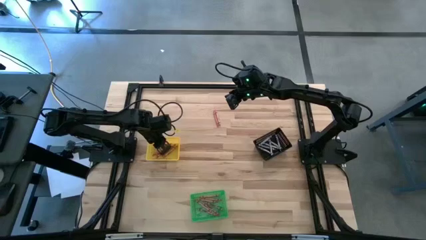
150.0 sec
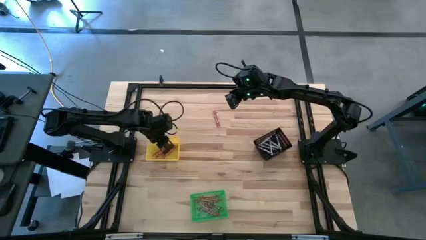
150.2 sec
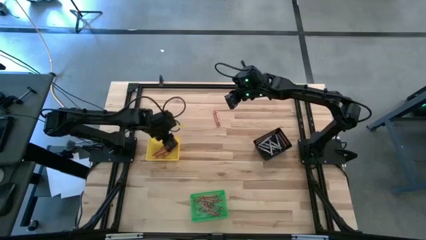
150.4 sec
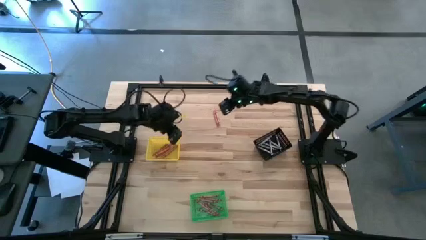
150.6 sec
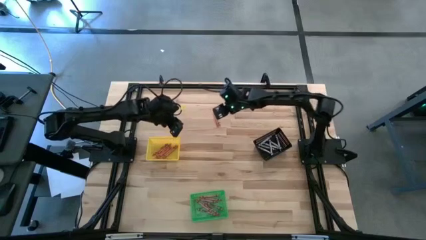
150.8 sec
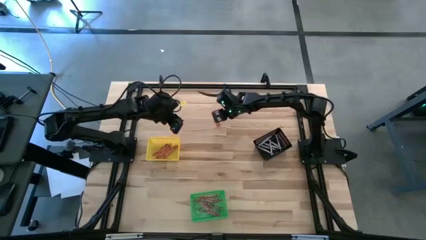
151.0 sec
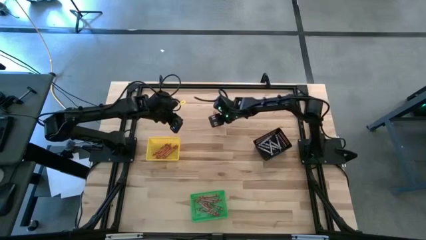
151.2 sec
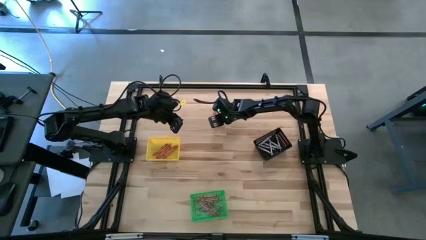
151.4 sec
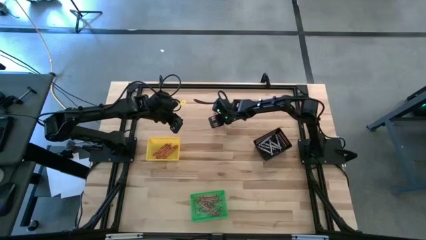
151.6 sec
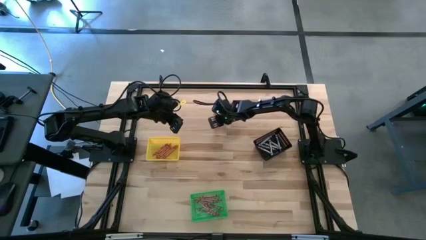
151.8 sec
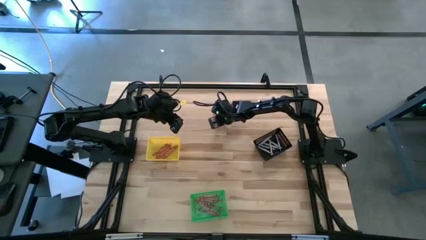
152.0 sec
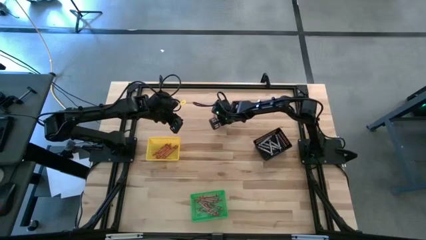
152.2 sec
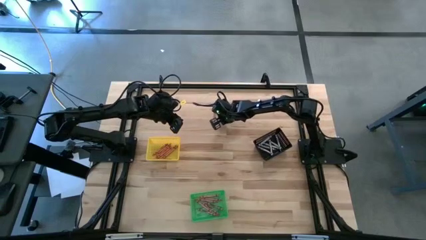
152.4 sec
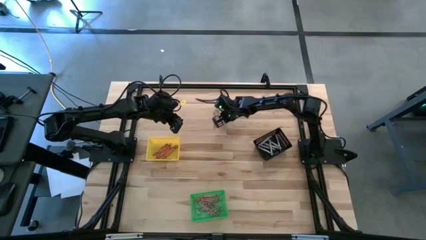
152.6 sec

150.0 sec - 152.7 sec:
Task: Sort crayons
Put the pink crayon into the green bin

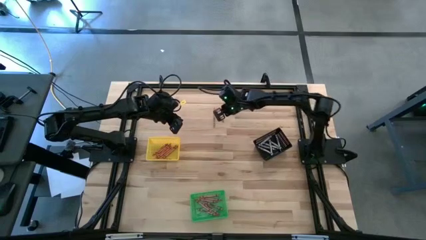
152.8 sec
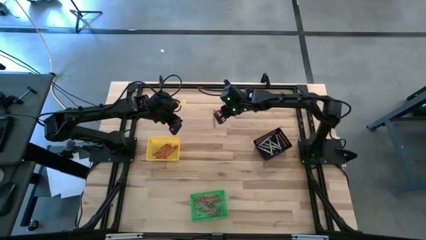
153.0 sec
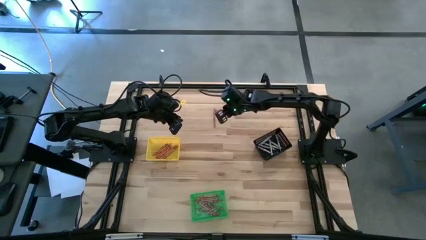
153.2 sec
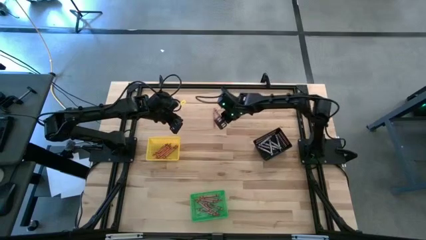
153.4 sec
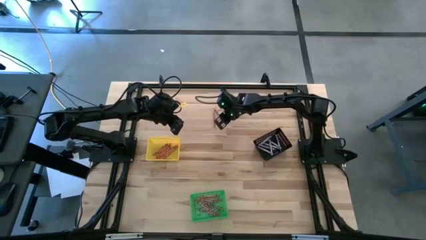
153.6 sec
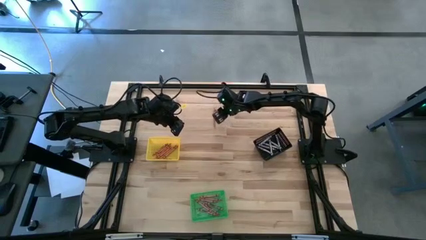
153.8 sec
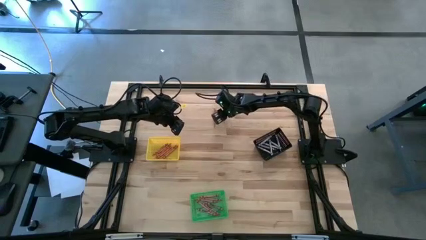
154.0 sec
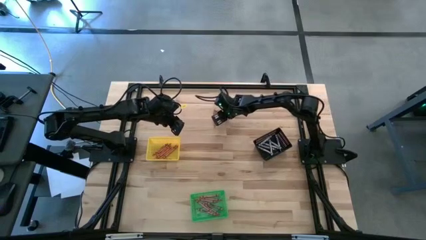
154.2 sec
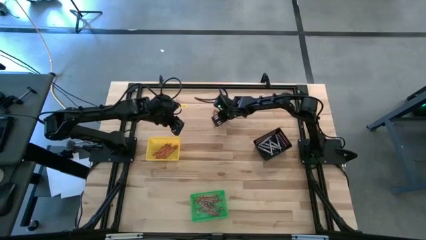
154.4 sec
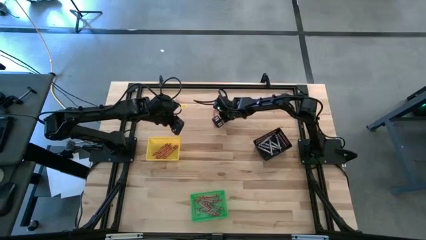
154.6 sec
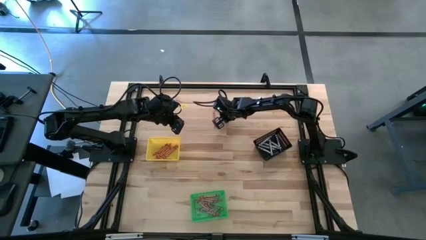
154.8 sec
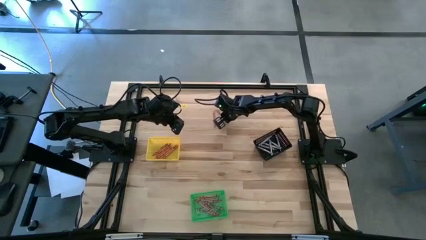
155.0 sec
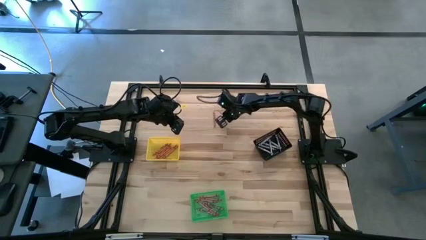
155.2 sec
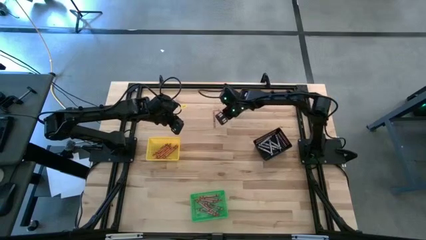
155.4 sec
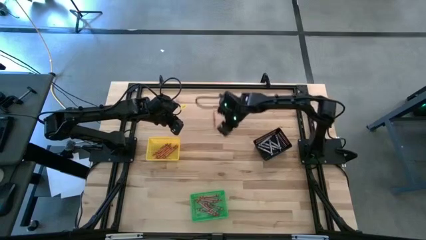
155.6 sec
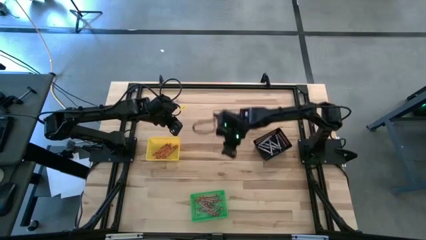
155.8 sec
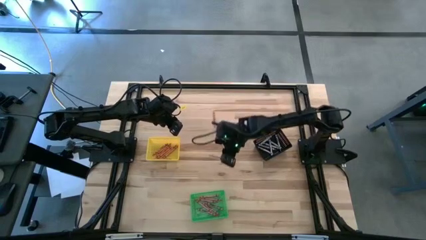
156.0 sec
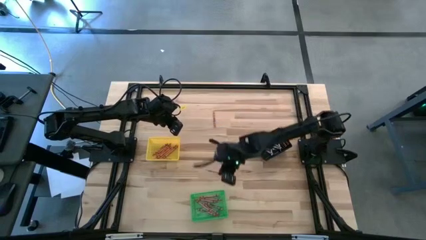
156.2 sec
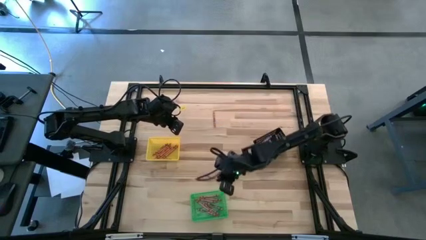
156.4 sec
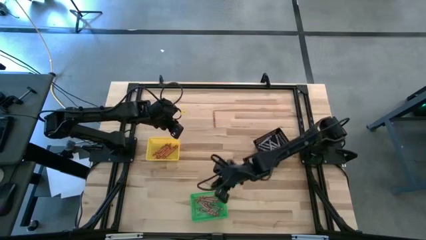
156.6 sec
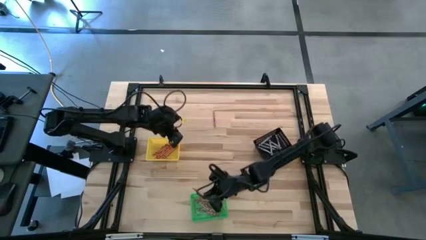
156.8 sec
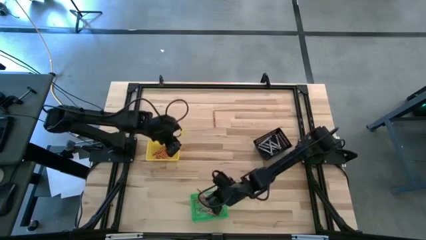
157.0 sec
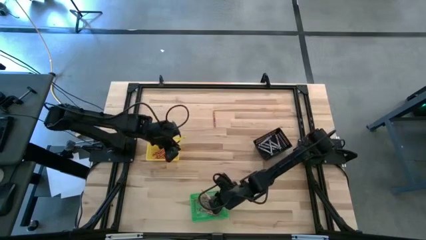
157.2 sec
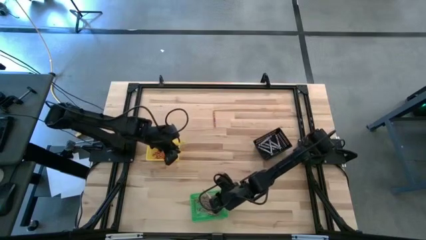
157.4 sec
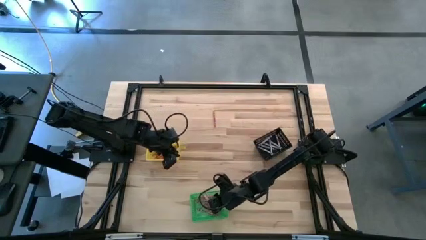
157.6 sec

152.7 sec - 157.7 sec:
Put the pink crayon into the green bin

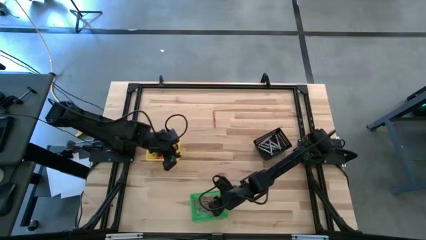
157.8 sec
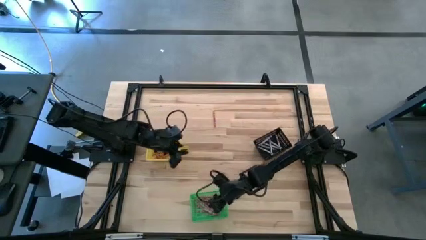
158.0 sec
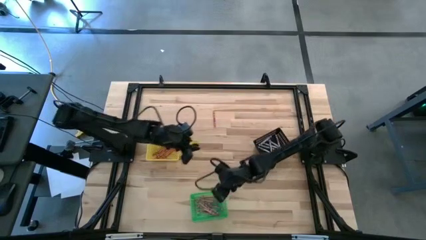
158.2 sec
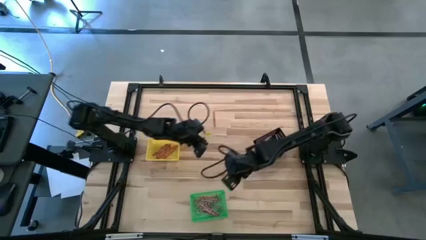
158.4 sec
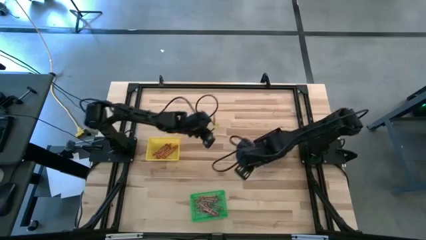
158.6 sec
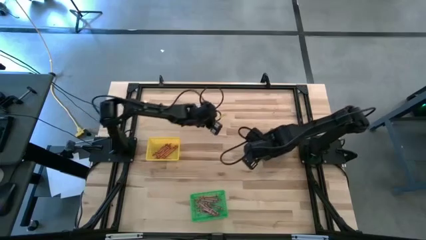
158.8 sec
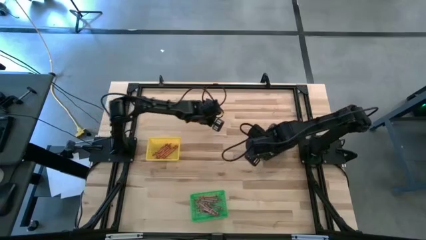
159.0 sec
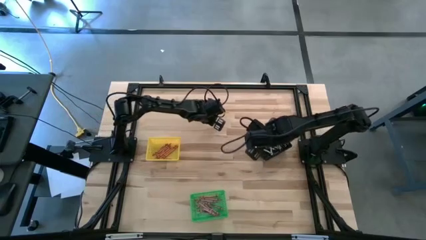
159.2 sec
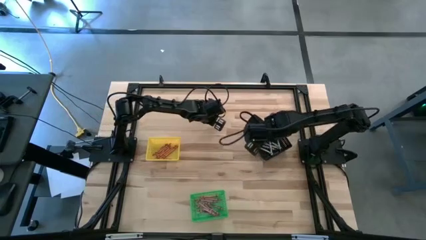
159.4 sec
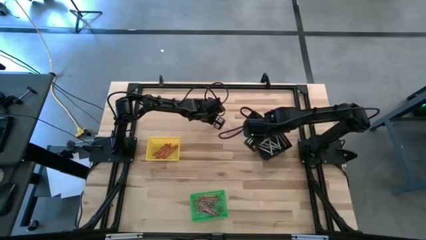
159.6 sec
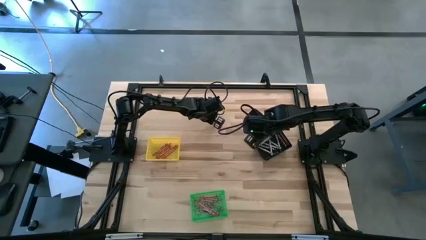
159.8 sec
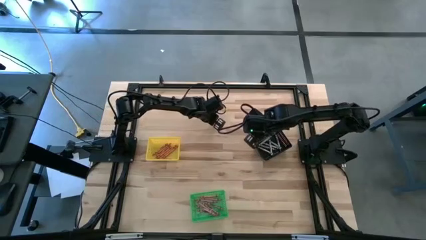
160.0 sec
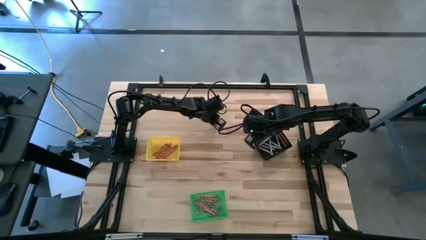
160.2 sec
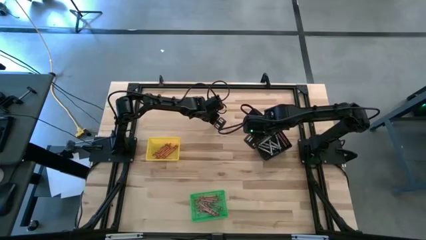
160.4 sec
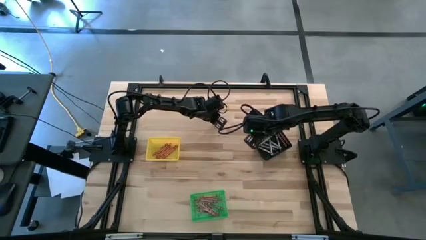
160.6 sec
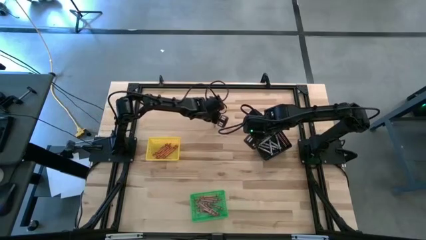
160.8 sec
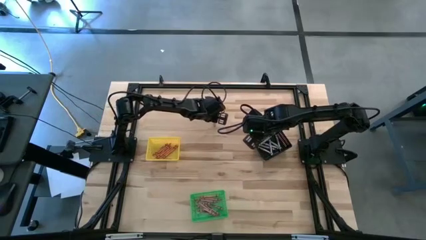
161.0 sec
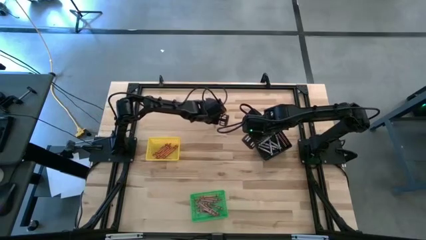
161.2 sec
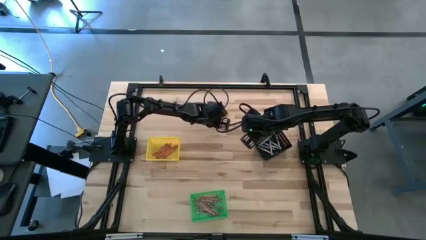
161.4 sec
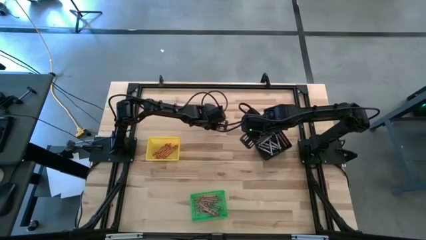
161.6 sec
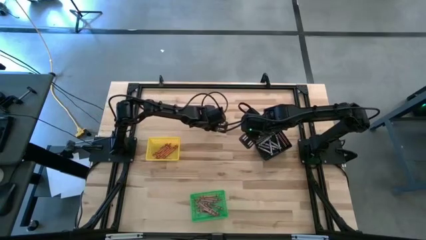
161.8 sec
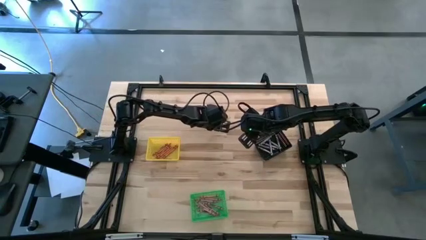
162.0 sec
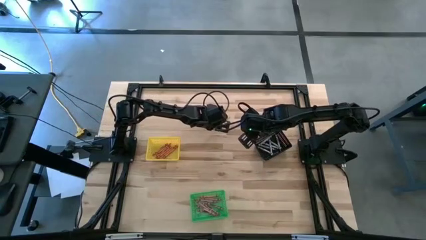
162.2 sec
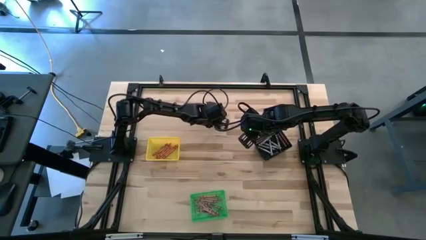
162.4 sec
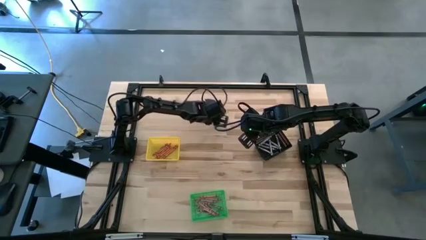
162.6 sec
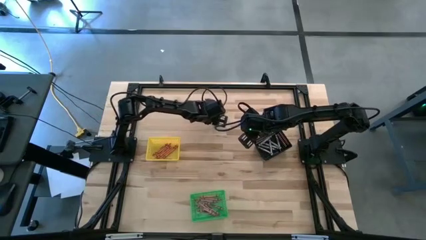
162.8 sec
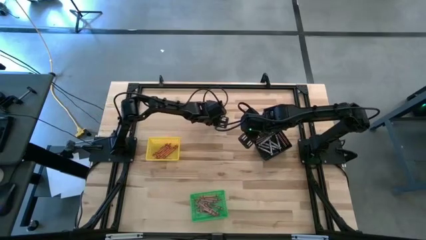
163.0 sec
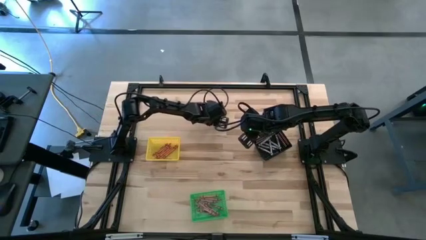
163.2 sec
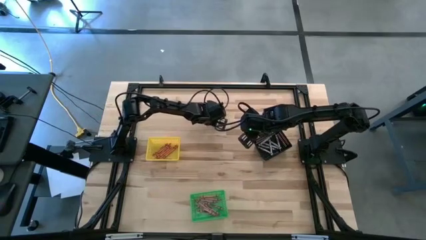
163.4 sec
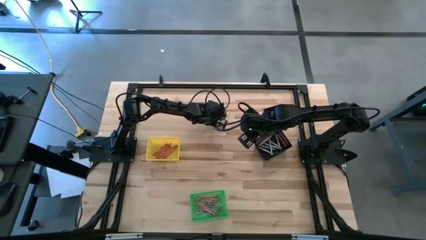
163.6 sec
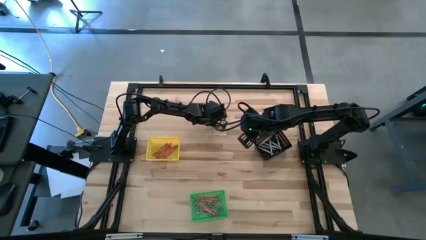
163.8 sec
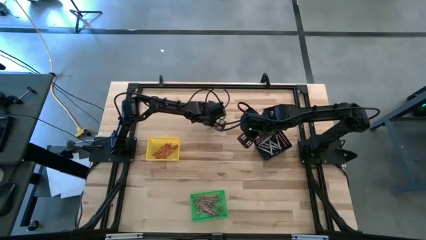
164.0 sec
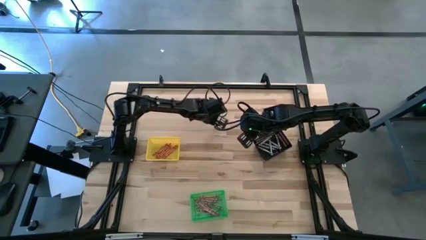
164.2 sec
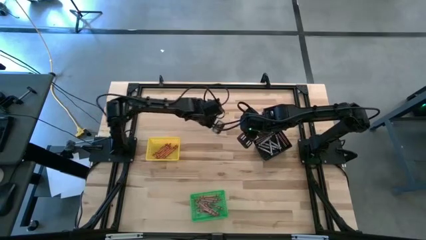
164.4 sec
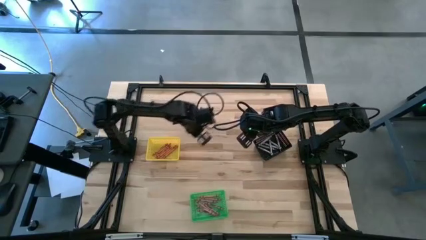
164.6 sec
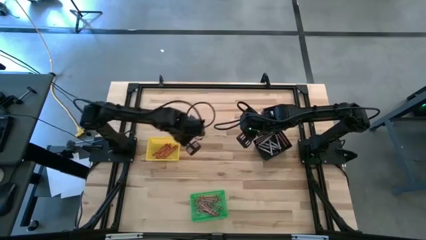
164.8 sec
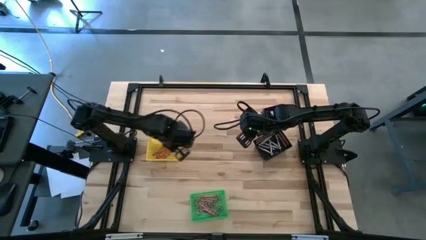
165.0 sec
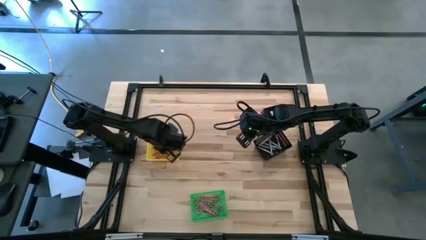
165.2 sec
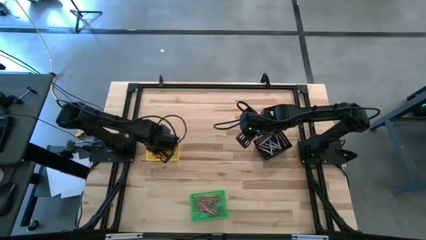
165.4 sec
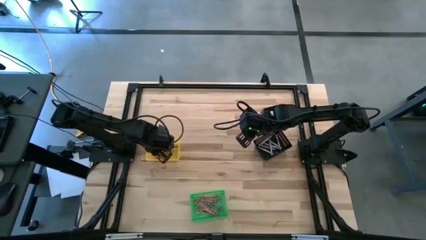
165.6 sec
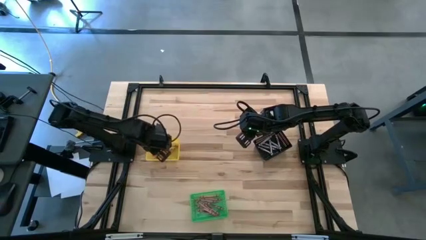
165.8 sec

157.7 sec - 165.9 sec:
Put the orange crayon into the yellow bin

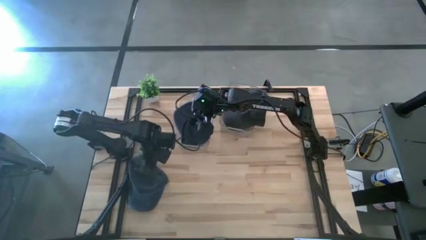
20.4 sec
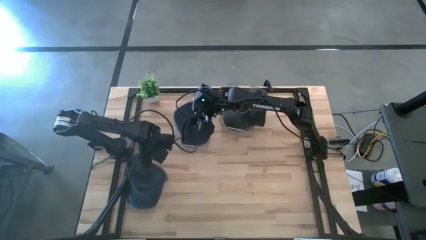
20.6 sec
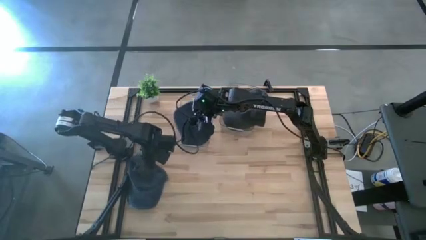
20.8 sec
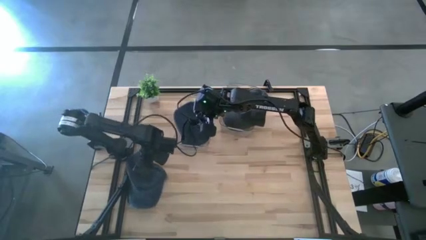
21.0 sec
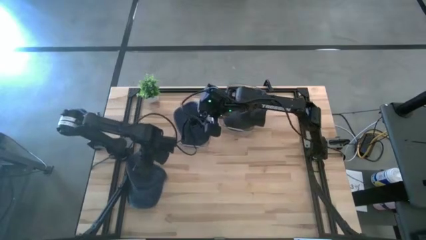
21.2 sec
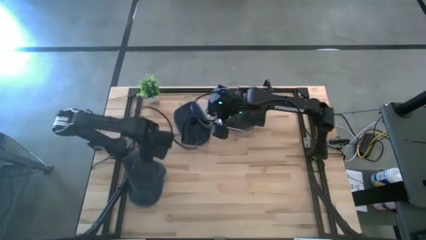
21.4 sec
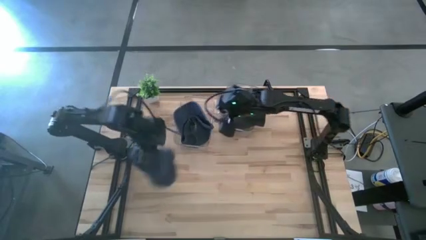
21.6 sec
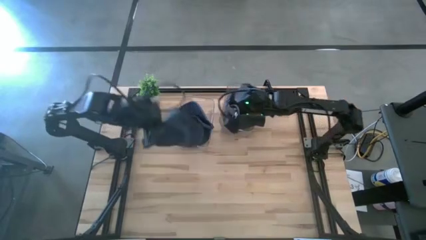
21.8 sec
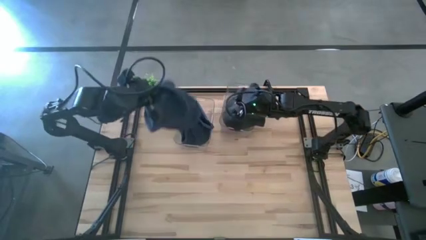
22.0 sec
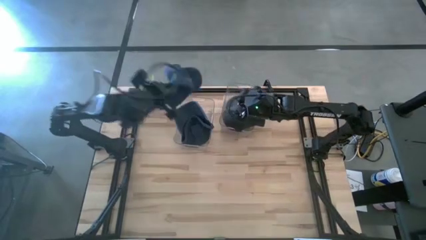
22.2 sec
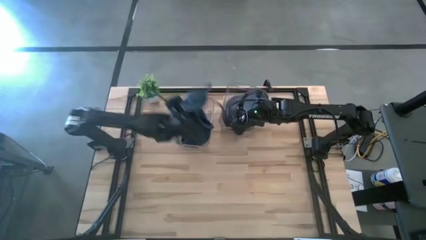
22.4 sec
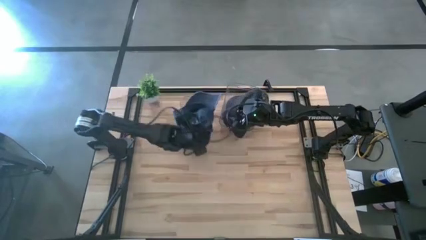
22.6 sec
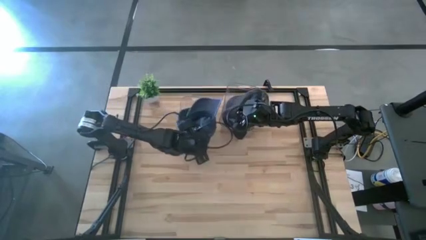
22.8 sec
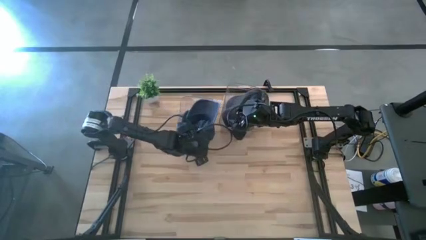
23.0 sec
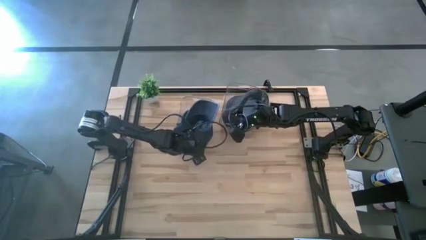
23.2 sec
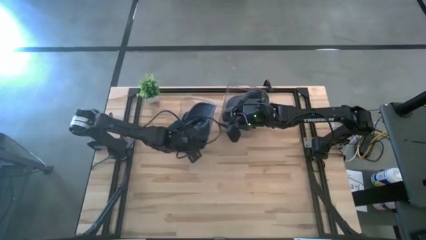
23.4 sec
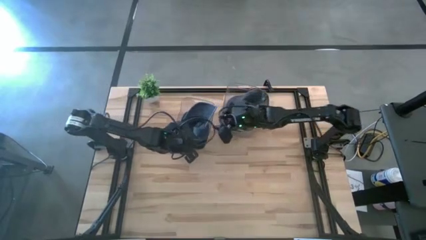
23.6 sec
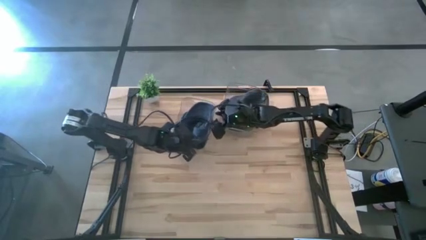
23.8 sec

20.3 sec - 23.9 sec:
Task: Pick & Place hat
Put the dark blue cap into the left transparent bin
